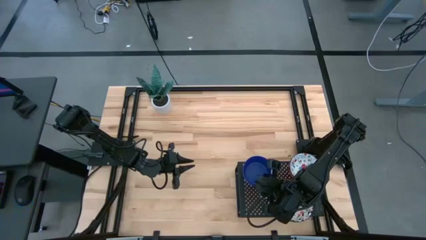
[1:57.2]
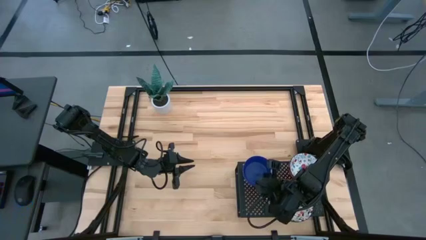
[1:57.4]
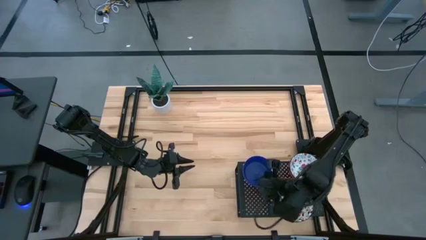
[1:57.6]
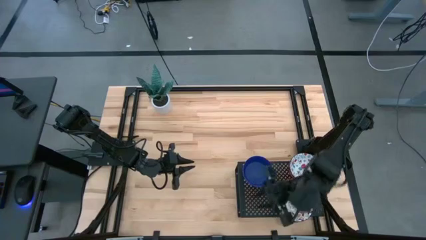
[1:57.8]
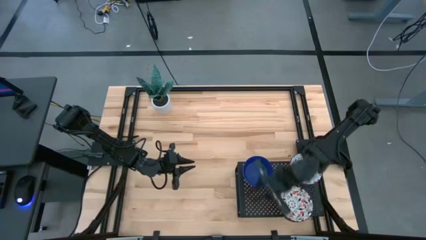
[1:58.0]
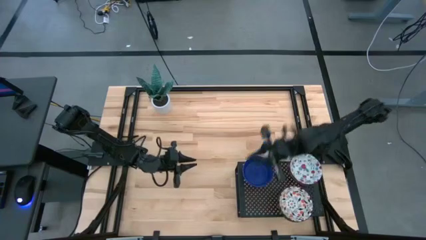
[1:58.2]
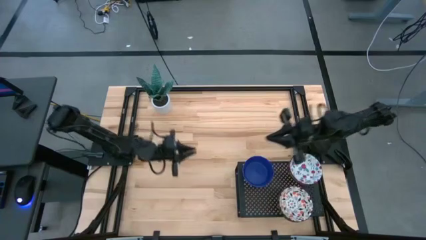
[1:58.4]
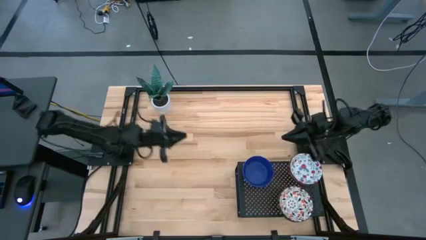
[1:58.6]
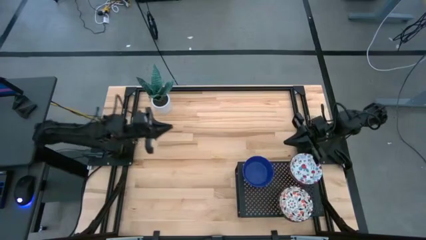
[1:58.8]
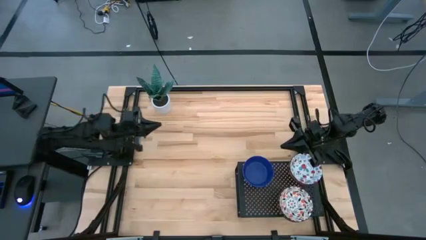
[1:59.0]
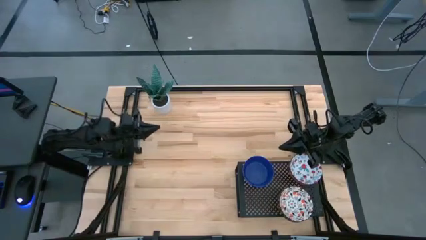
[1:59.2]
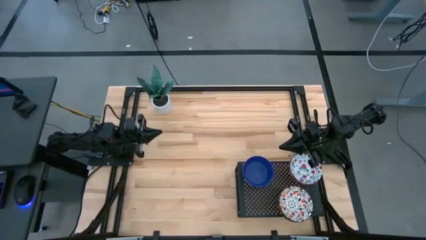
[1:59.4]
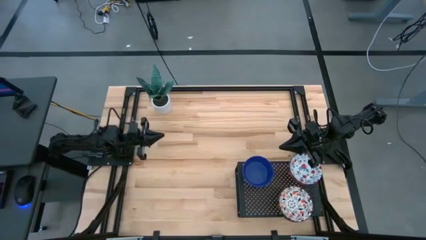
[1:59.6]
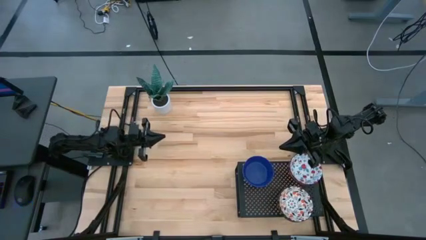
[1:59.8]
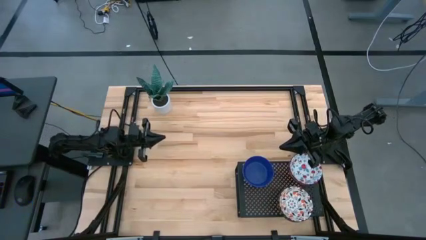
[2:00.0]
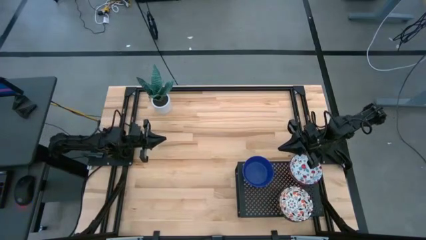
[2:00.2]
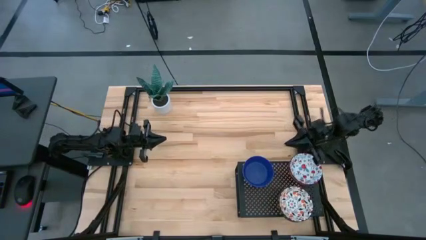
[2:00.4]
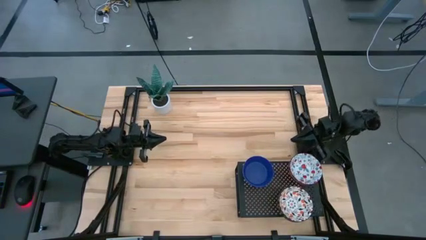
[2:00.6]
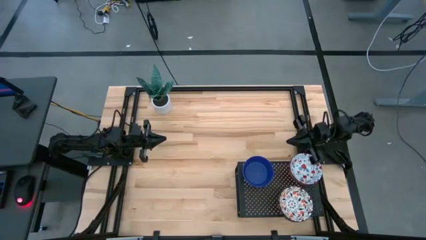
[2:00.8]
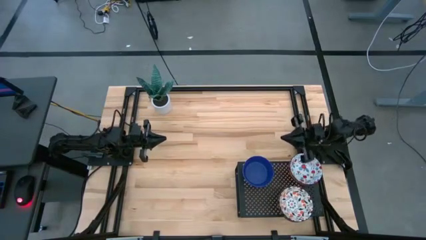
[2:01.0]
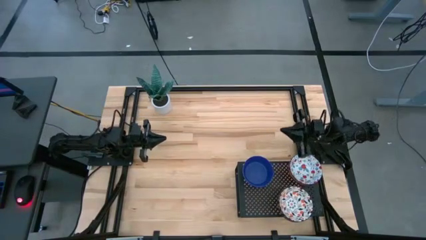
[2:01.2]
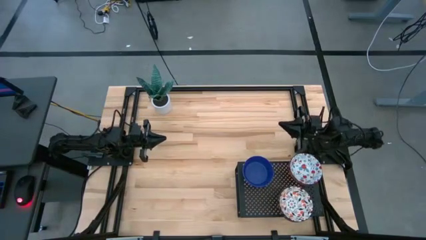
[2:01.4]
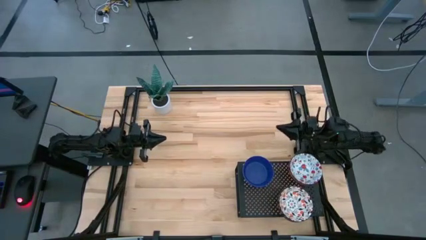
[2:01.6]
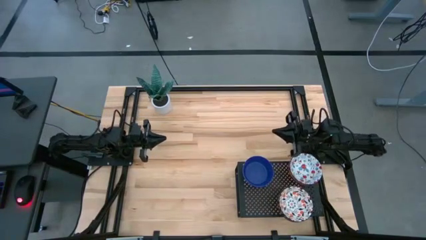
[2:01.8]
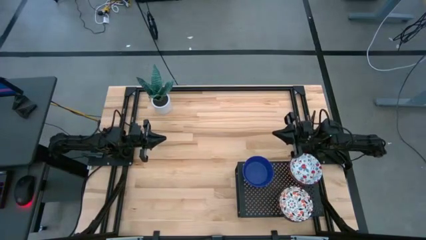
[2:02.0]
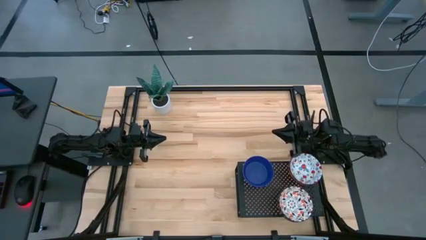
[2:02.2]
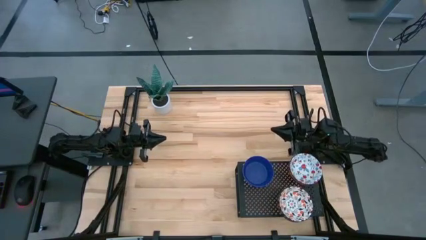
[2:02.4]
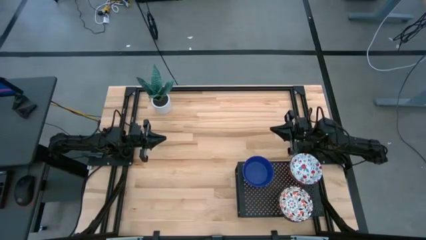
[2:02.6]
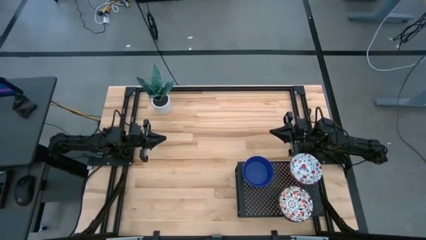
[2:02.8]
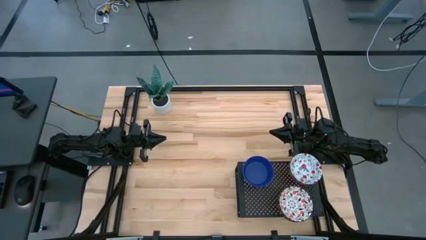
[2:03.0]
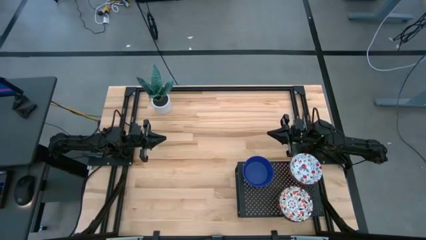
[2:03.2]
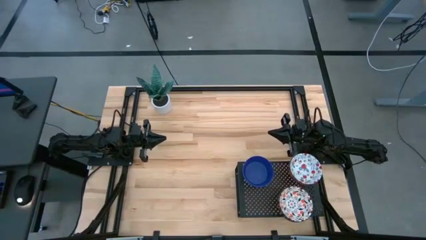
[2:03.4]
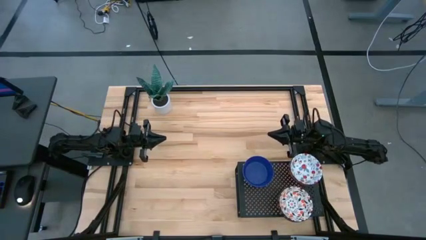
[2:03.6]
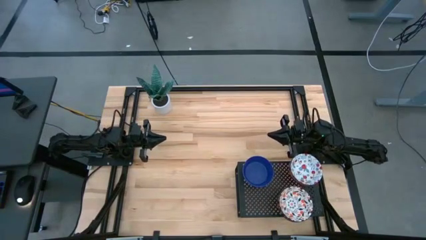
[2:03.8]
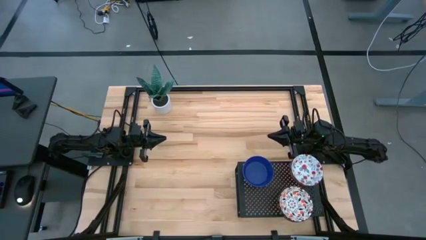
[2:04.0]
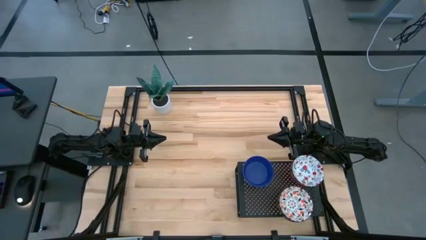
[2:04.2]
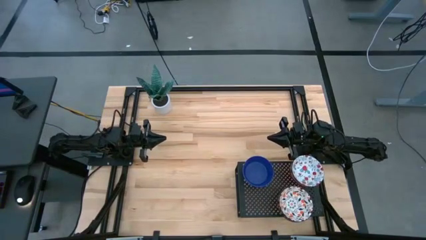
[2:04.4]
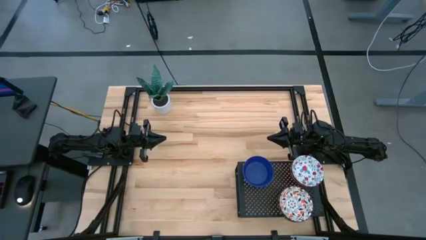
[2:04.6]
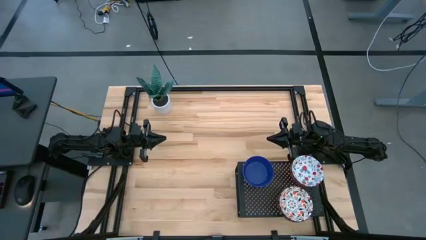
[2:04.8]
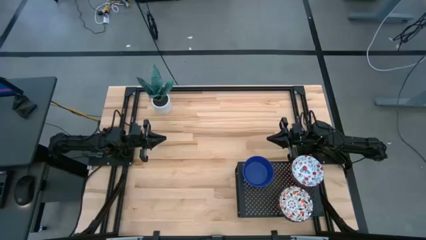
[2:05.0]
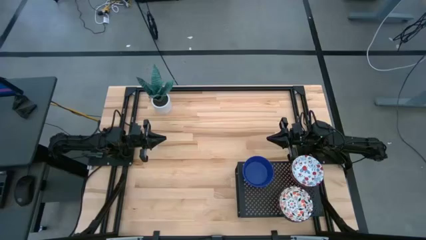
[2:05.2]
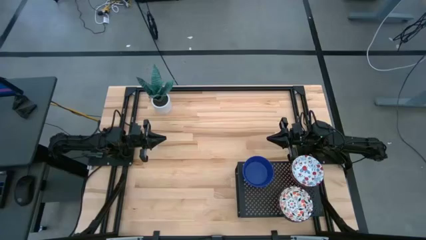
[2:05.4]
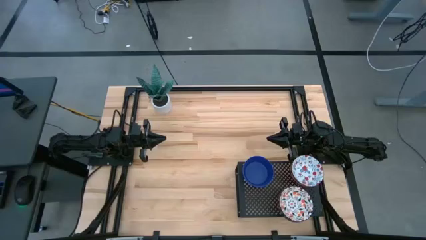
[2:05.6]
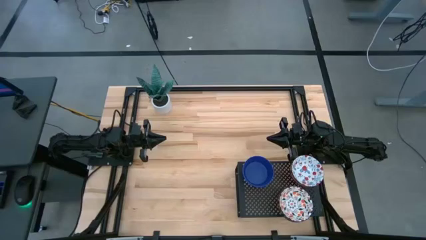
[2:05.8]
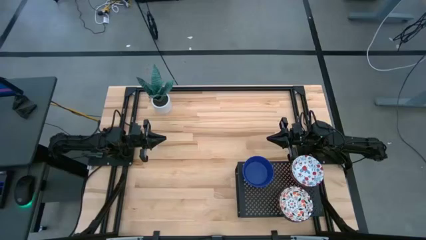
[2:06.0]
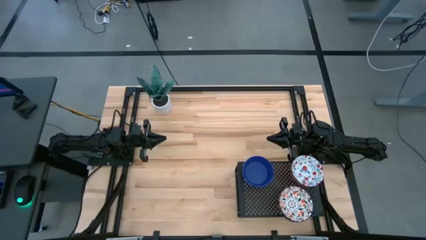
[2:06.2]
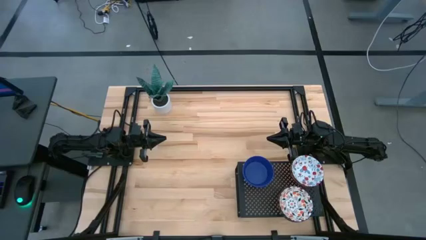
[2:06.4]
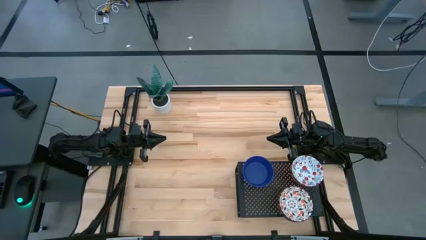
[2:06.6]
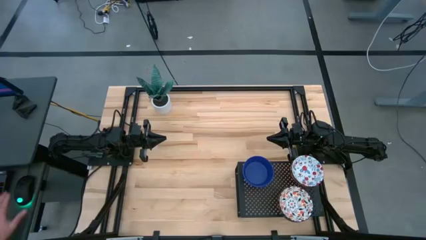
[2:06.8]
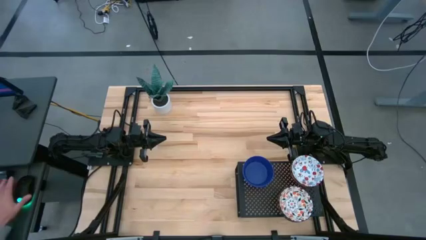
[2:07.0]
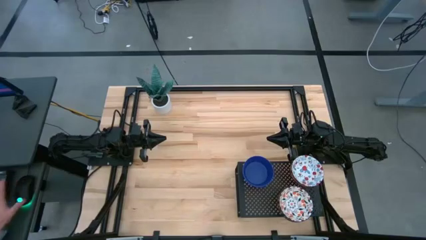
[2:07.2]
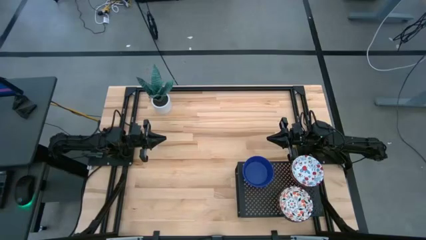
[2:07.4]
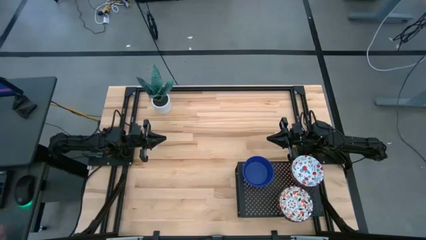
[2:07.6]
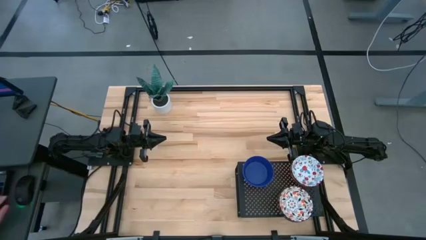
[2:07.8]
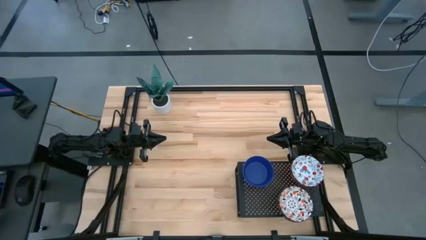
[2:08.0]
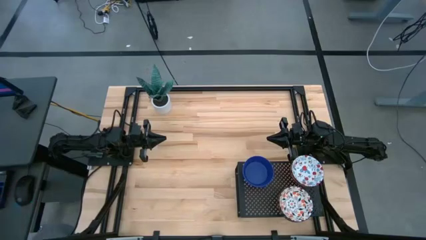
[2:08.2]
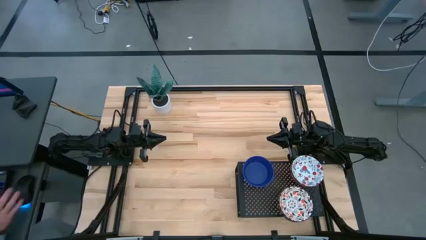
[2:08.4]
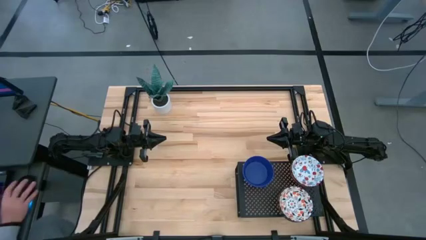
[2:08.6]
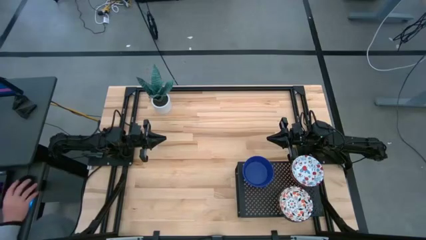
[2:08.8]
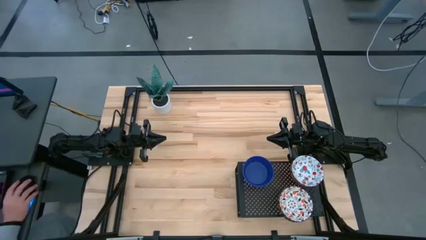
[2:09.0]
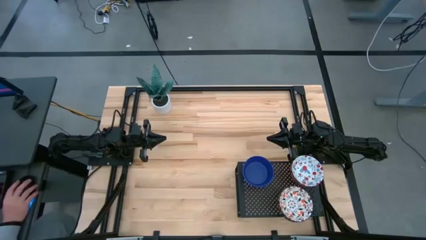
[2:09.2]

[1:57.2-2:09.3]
Task: Pick & Place Mini bowls
Return to home position
